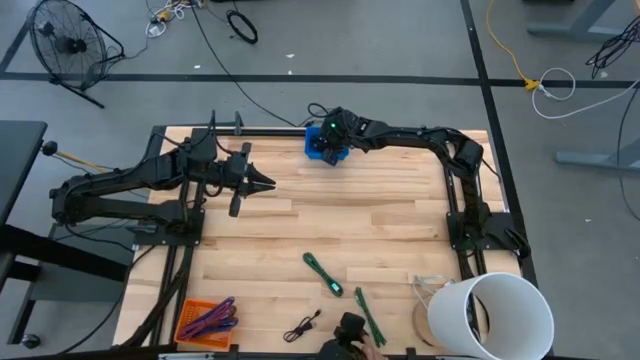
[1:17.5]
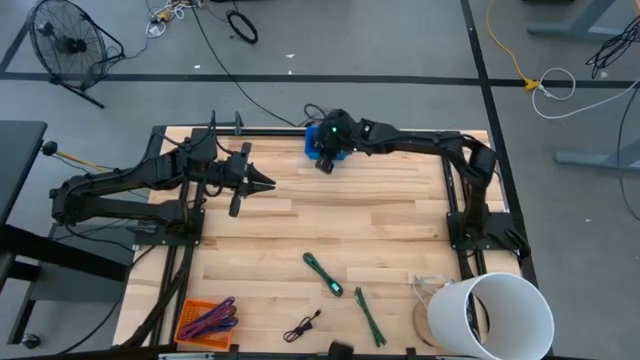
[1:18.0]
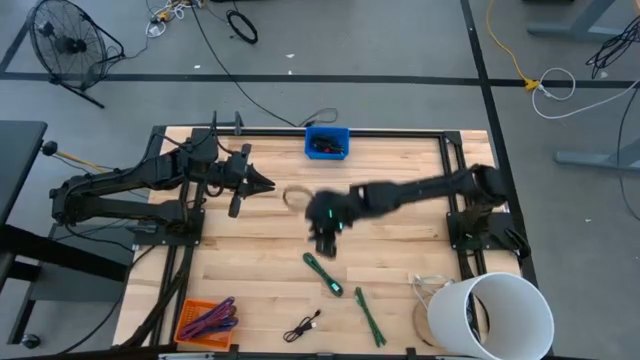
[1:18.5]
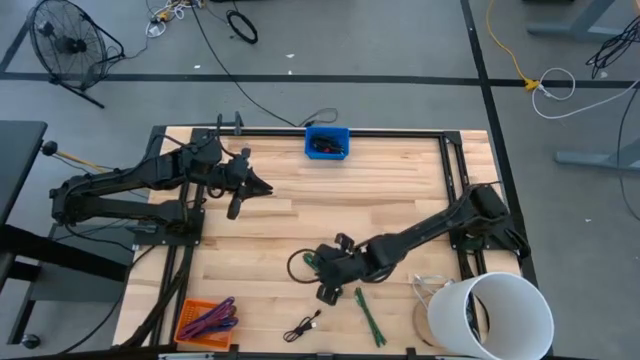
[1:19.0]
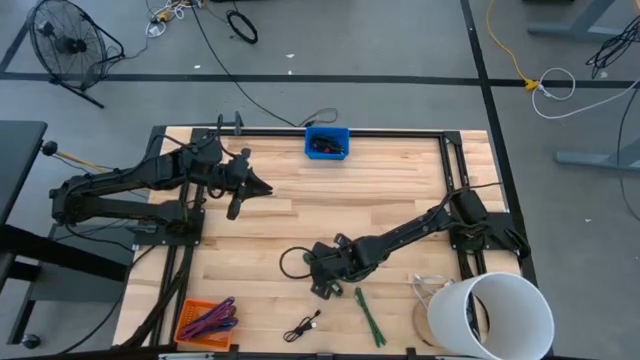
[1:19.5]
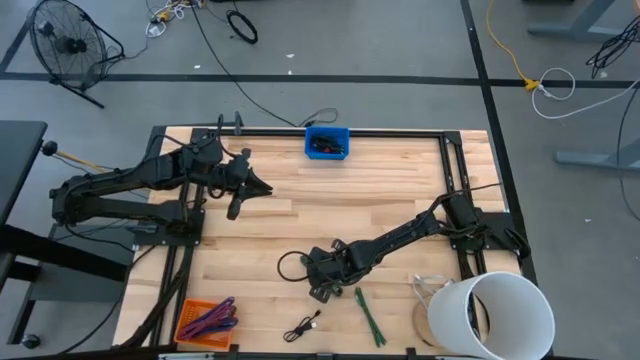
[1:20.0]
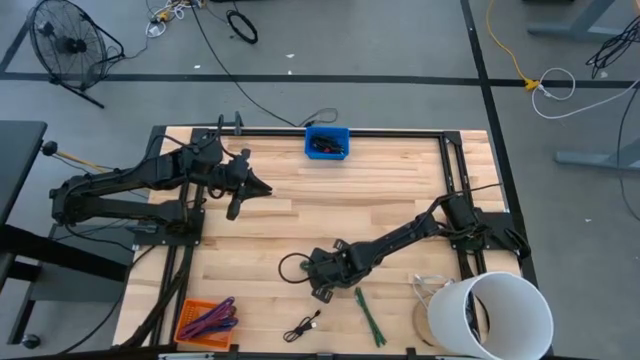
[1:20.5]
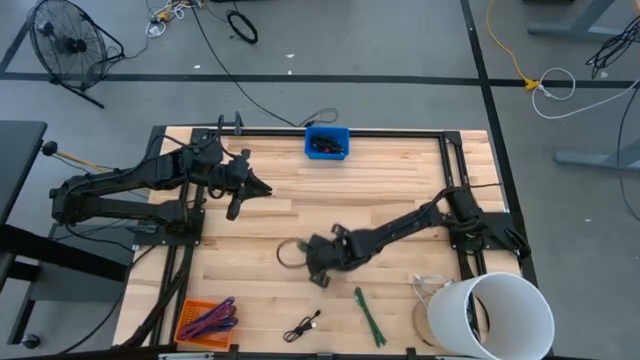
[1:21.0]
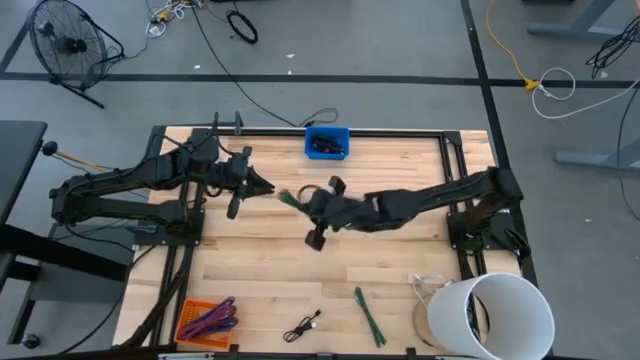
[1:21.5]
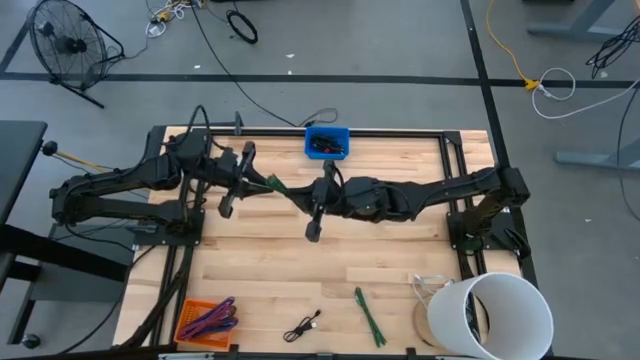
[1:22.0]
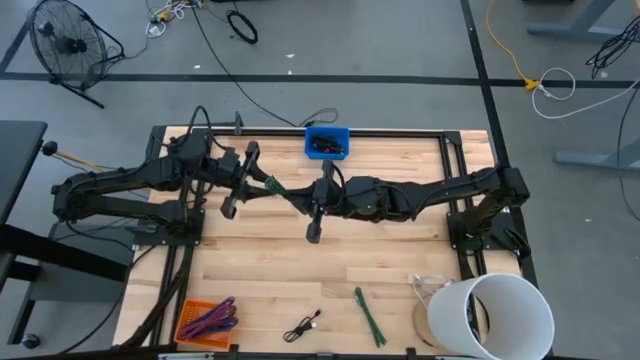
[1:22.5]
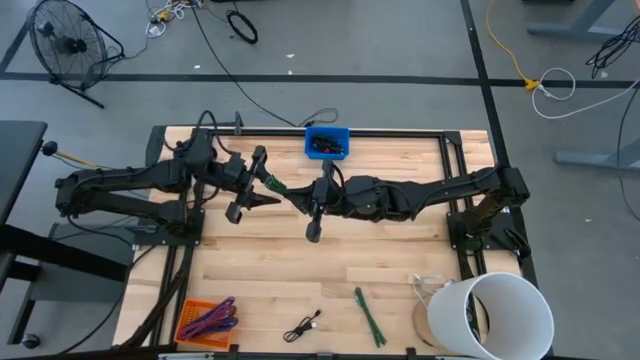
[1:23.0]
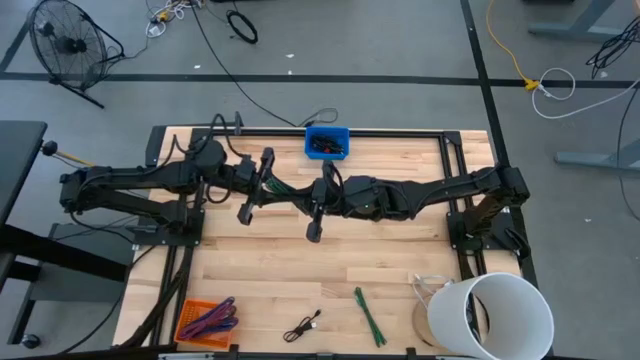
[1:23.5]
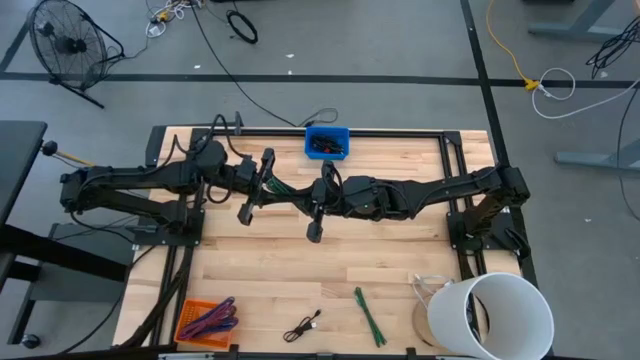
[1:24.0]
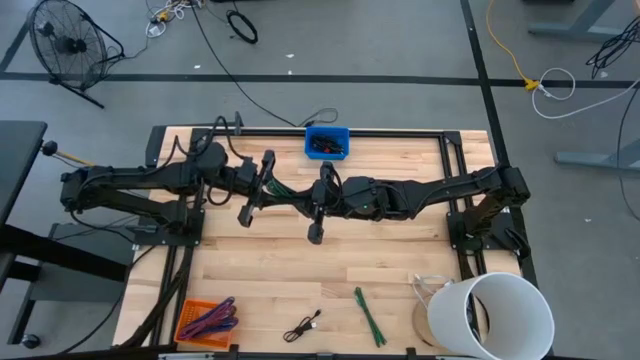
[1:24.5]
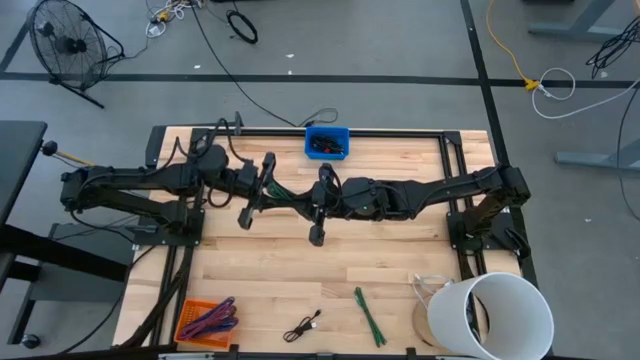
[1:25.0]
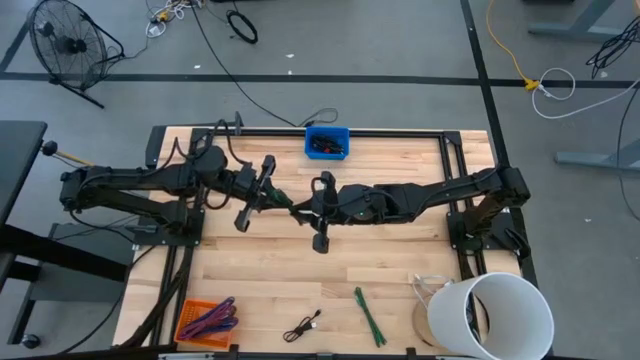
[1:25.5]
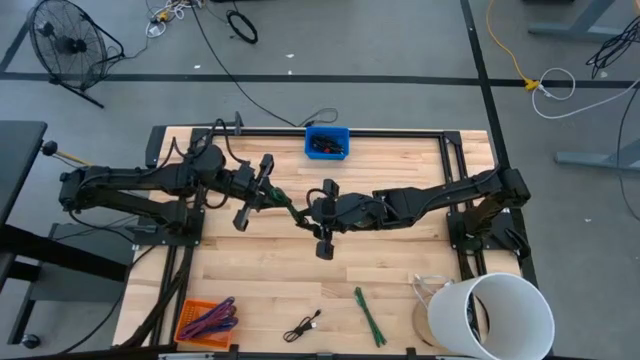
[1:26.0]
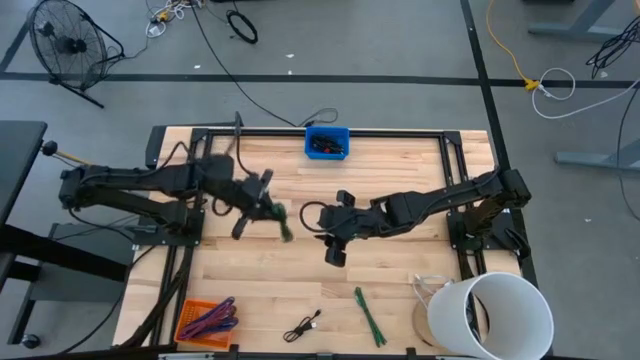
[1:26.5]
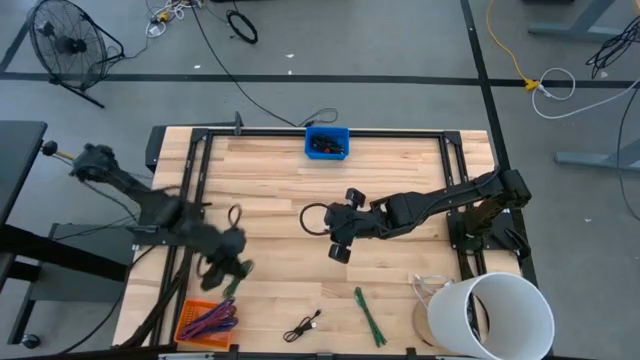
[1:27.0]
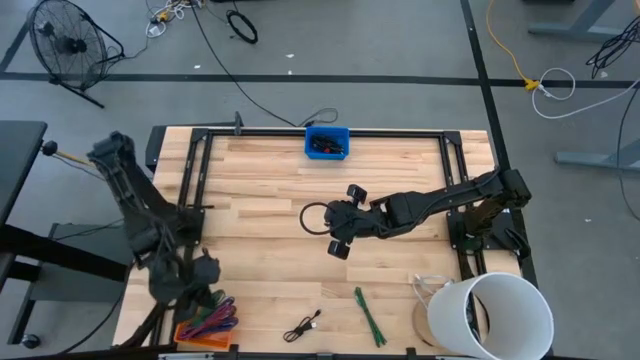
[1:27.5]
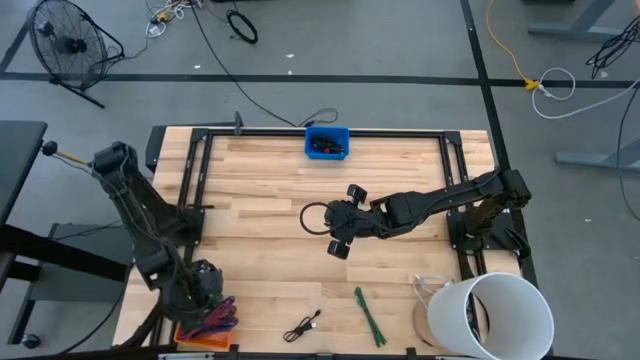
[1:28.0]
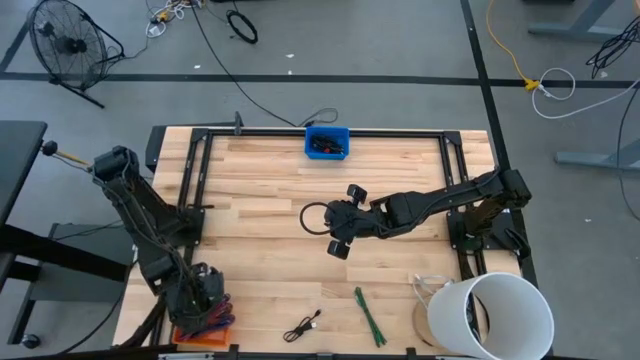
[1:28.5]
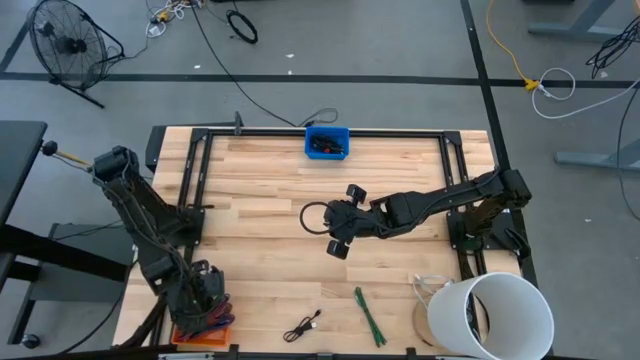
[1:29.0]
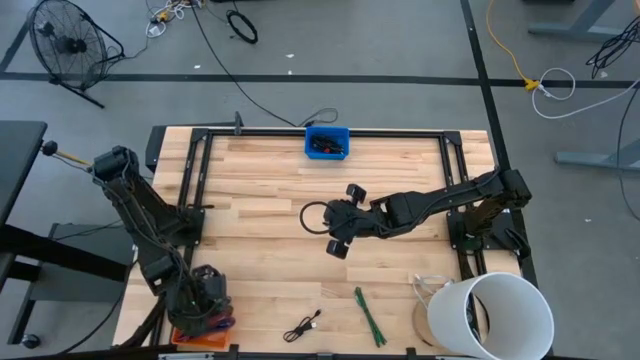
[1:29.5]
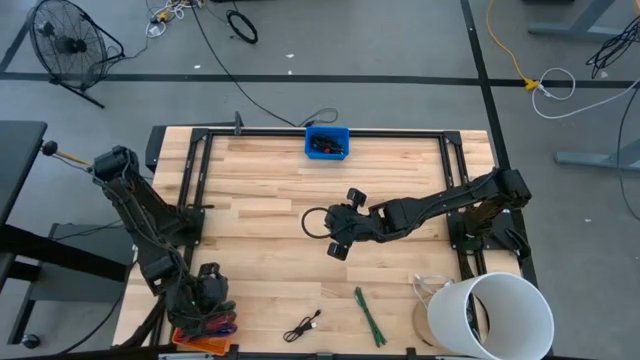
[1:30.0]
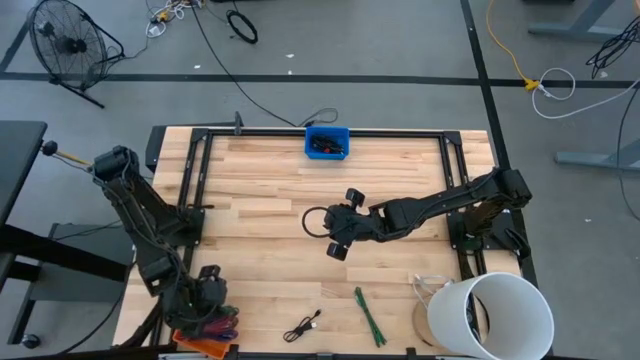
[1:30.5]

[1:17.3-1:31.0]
Task: Pick & Place USB Port
Put the green black charger cable into the orange bin

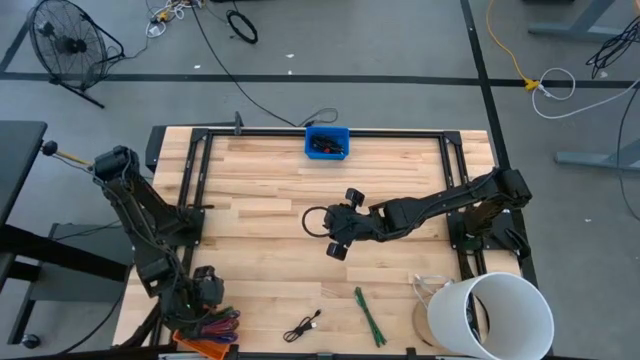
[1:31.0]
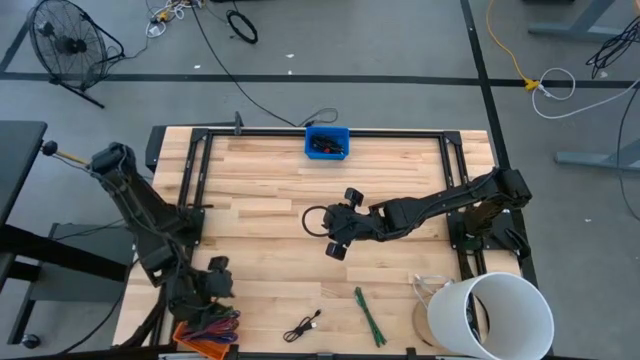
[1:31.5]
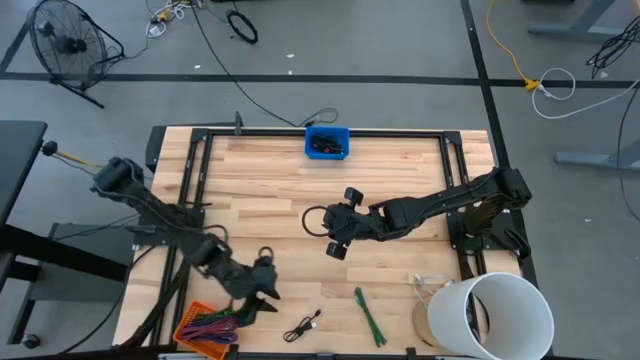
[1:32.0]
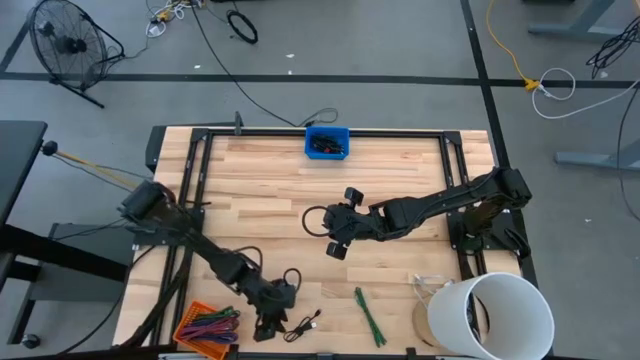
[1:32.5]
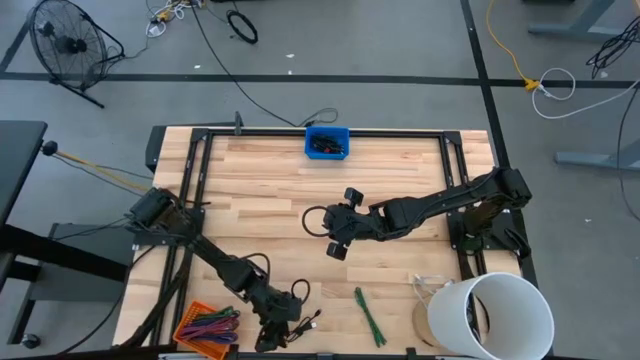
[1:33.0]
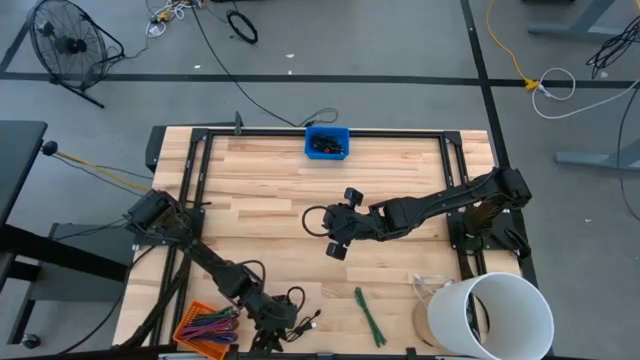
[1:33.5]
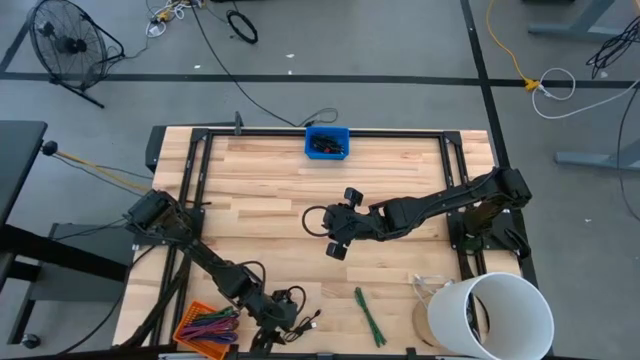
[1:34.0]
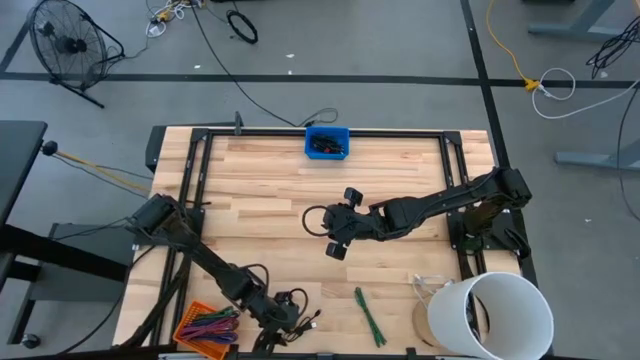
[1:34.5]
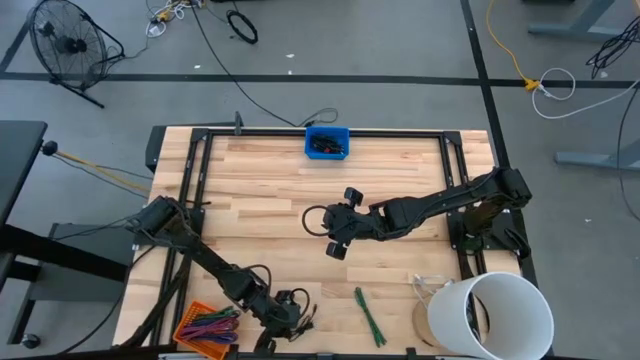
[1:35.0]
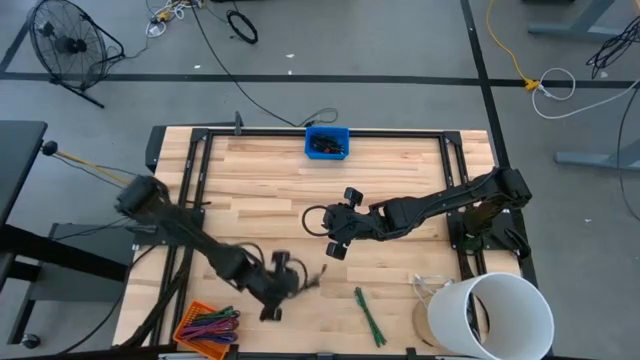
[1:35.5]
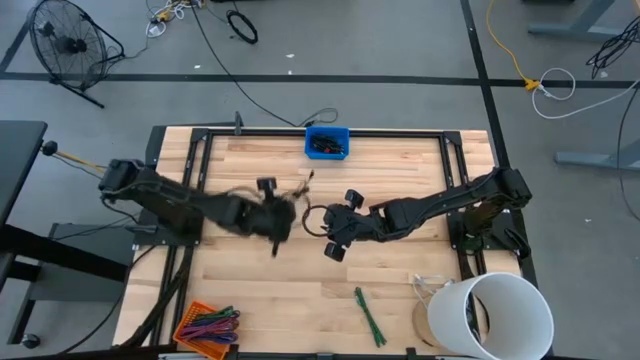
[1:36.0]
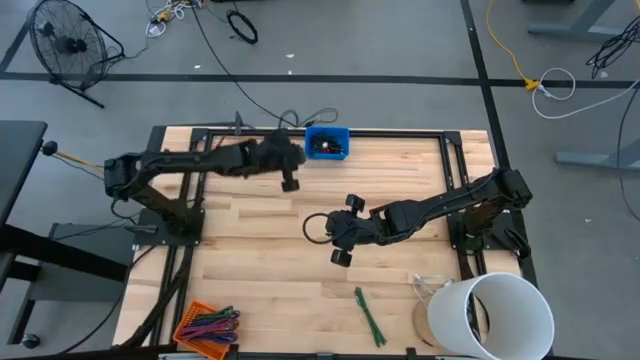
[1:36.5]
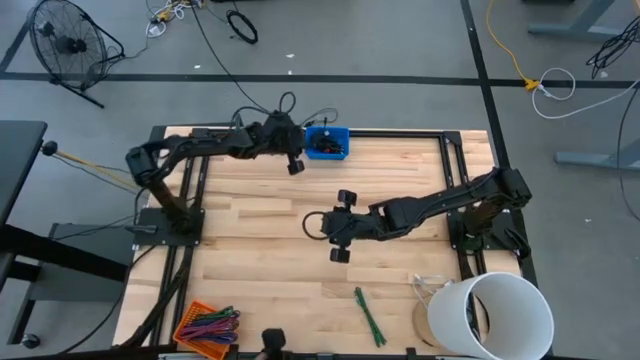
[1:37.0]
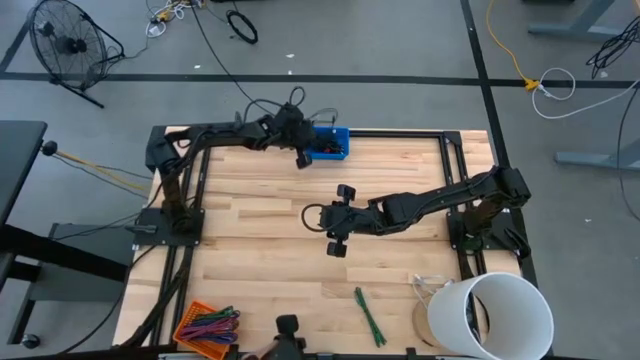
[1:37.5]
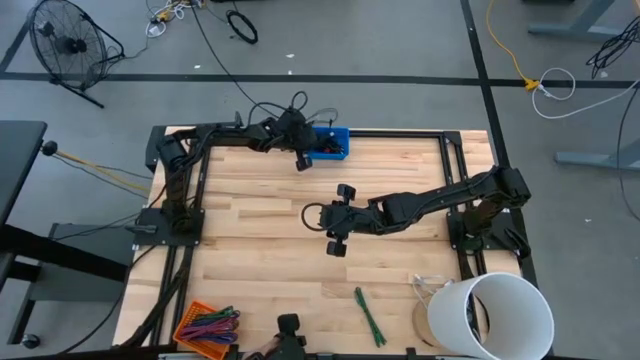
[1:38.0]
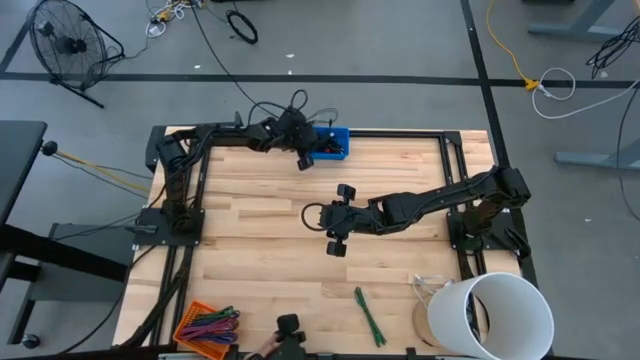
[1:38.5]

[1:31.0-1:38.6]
Put the black charger cable into the blue bin

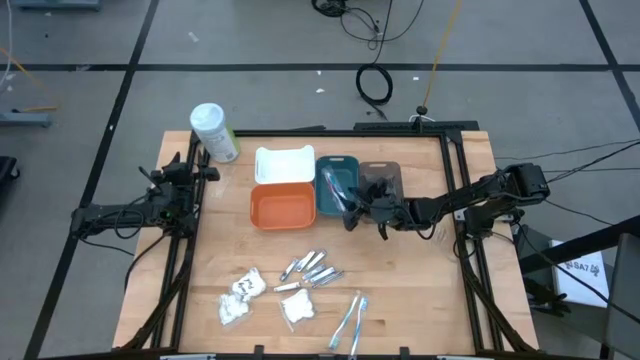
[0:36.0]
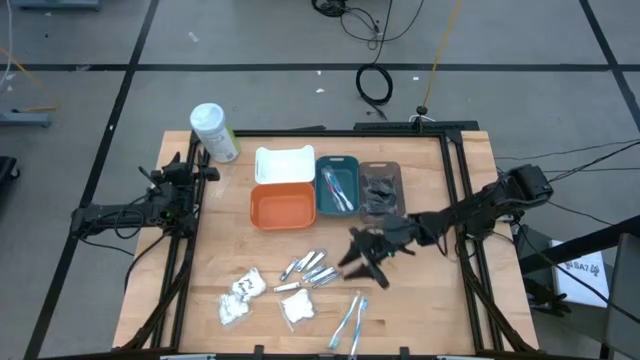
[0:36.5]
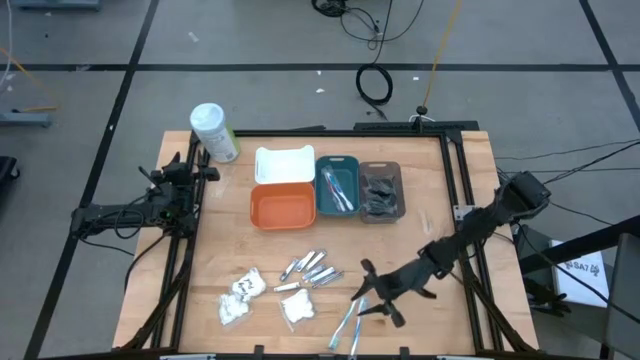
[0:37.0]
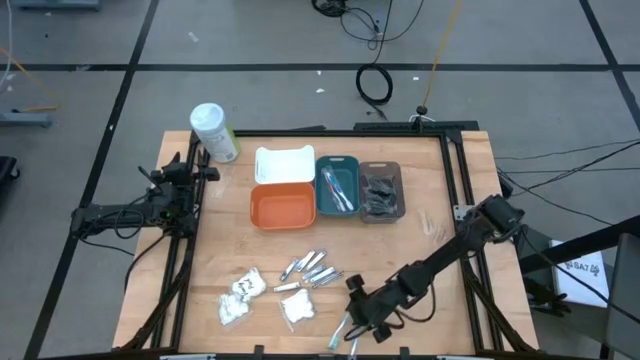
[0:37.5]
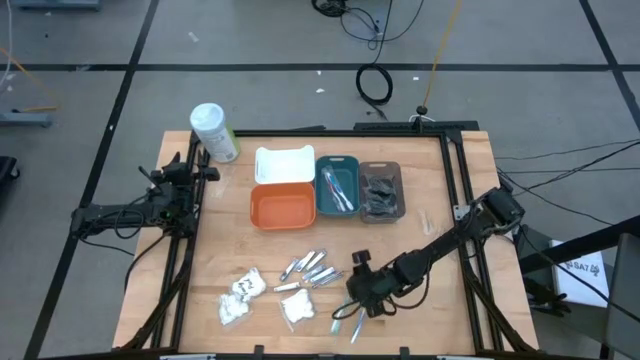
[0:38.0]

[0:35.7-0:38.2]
Task: Pick & Place Travel size toiletries
Adjust the green toothbrush on the table
